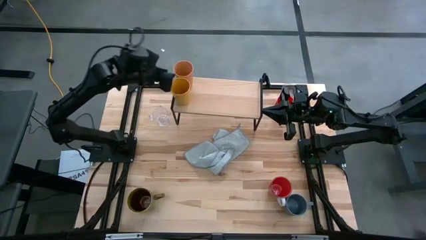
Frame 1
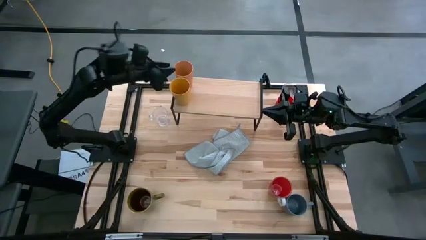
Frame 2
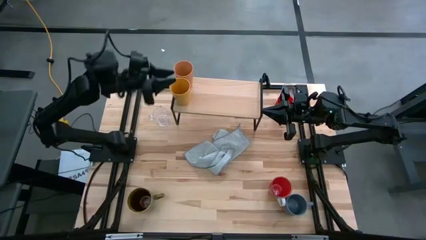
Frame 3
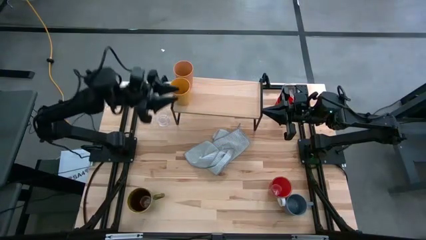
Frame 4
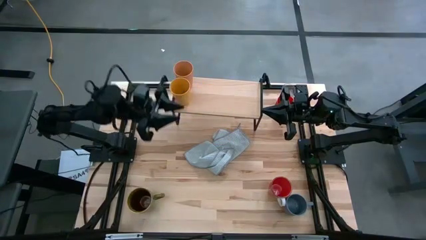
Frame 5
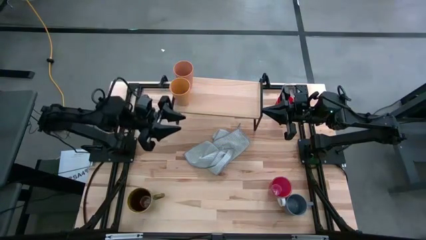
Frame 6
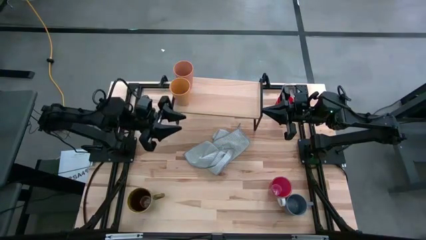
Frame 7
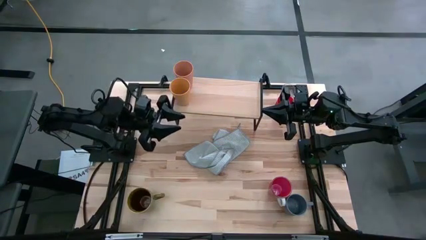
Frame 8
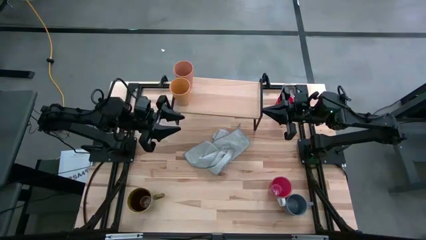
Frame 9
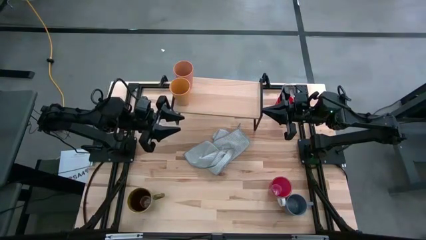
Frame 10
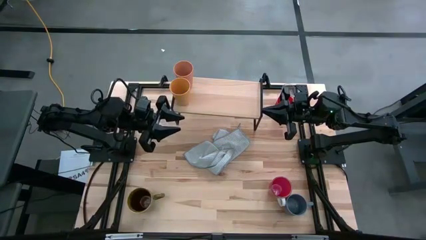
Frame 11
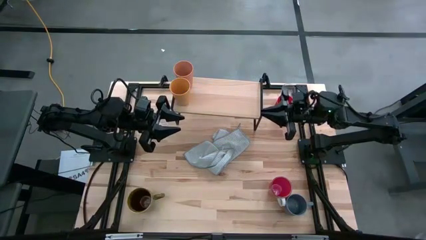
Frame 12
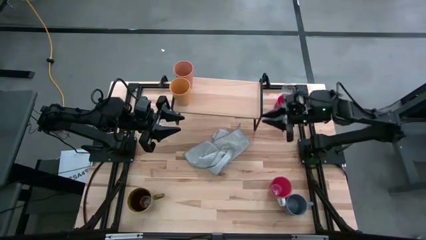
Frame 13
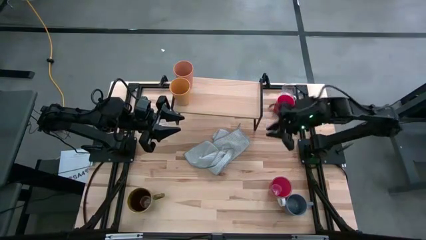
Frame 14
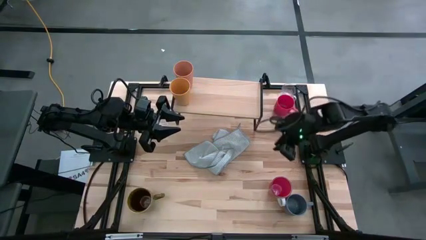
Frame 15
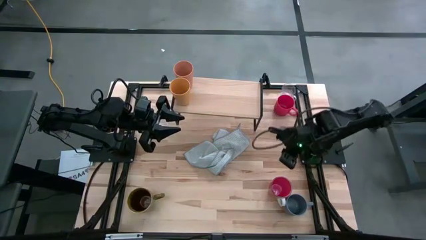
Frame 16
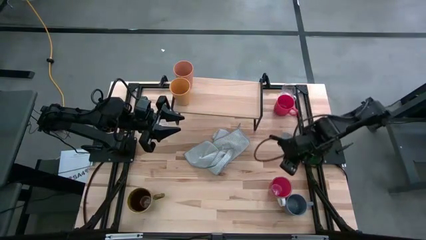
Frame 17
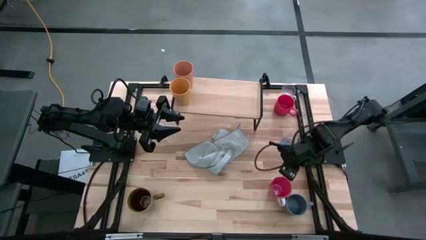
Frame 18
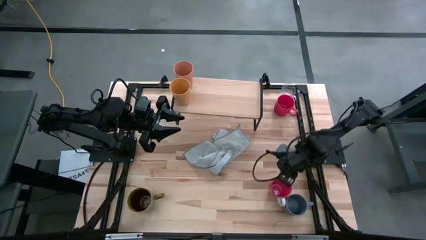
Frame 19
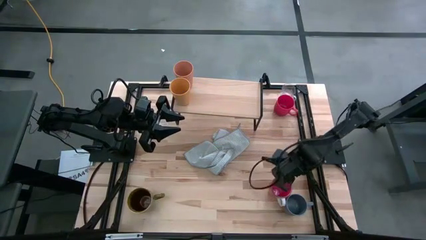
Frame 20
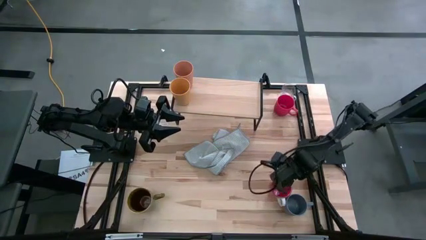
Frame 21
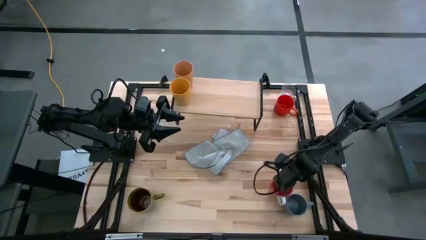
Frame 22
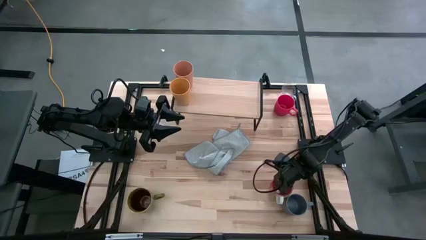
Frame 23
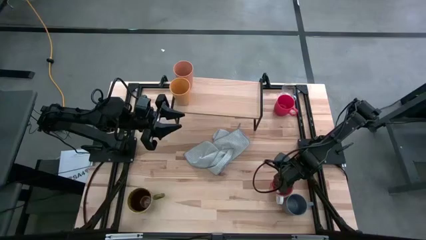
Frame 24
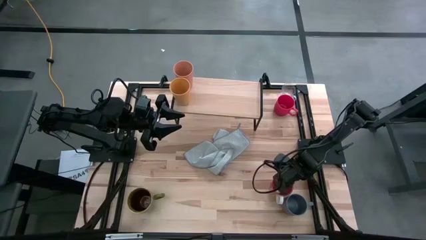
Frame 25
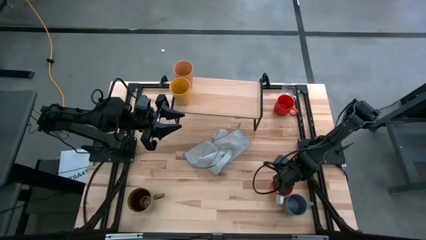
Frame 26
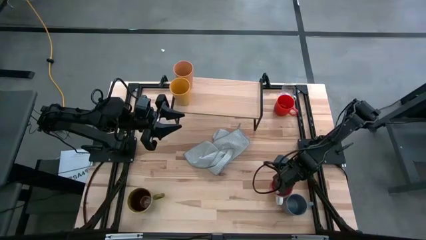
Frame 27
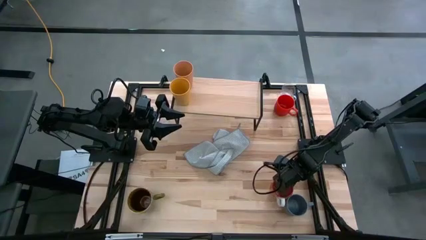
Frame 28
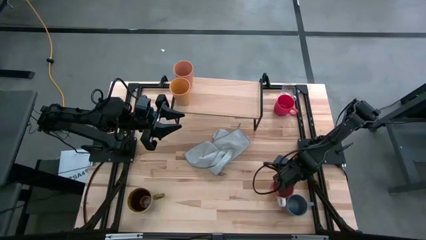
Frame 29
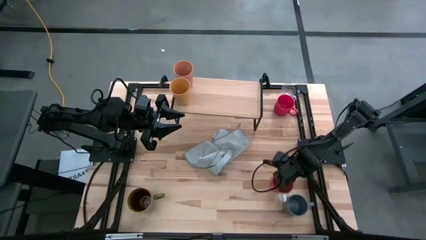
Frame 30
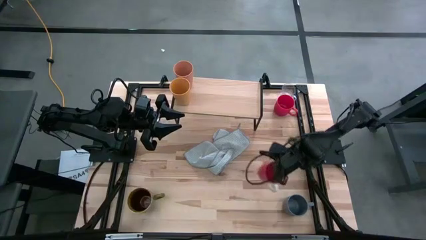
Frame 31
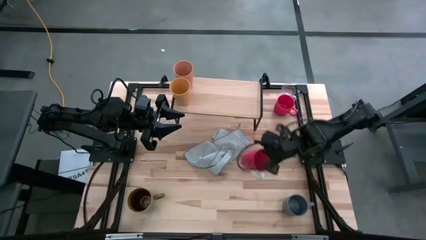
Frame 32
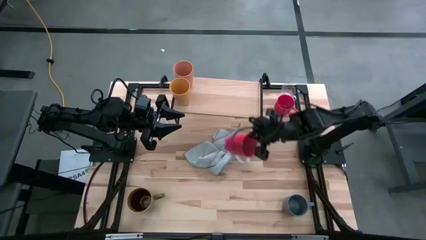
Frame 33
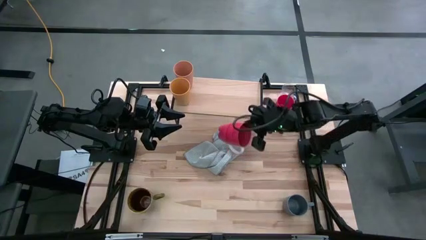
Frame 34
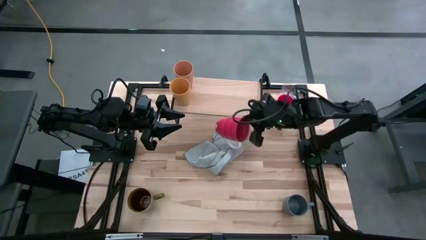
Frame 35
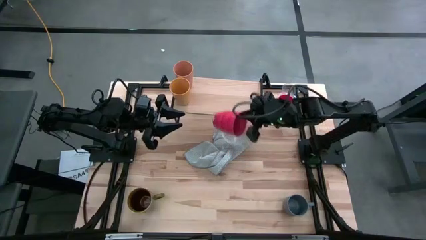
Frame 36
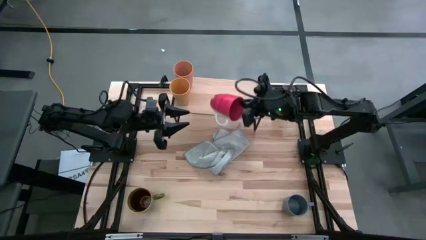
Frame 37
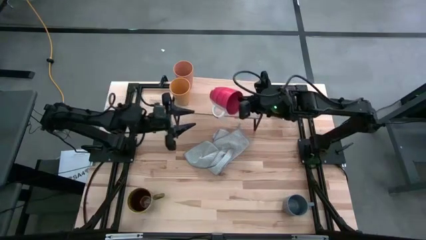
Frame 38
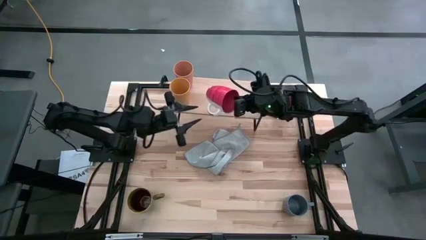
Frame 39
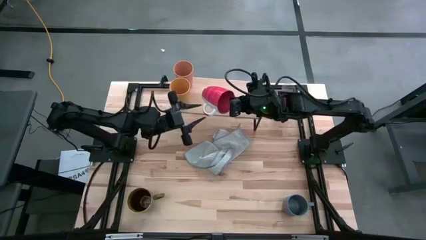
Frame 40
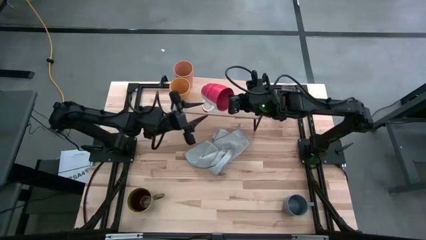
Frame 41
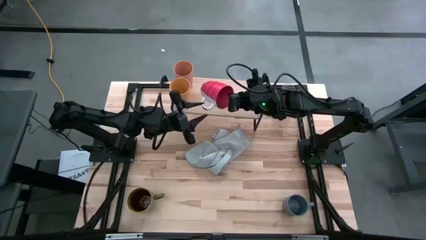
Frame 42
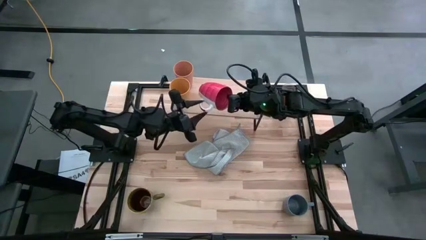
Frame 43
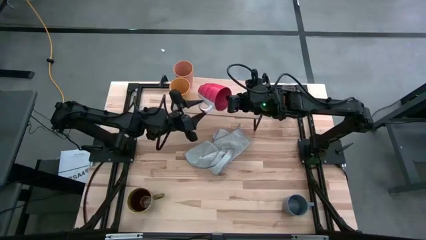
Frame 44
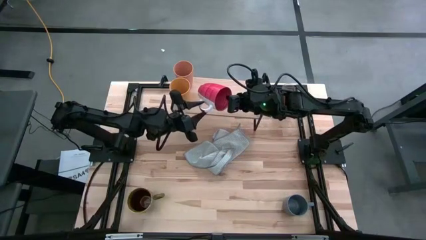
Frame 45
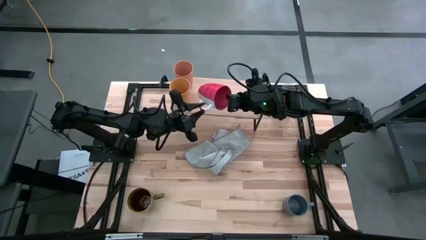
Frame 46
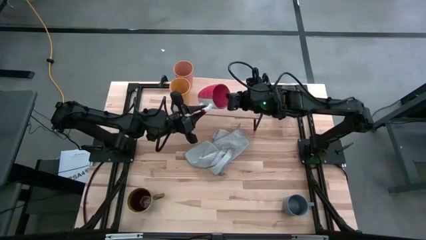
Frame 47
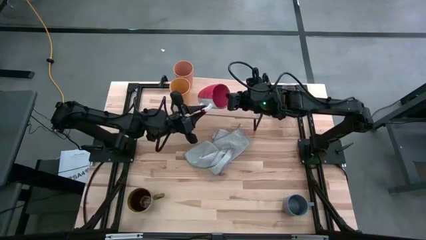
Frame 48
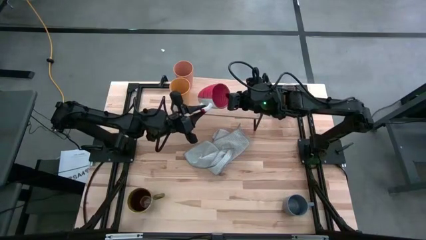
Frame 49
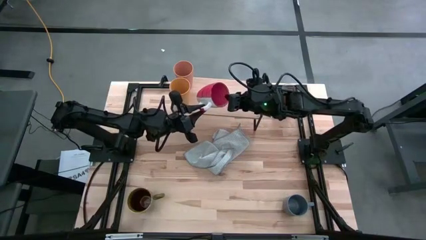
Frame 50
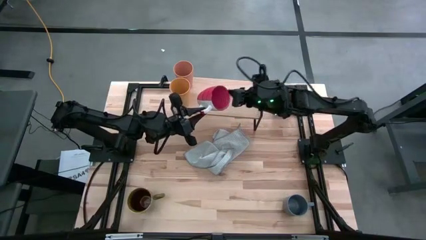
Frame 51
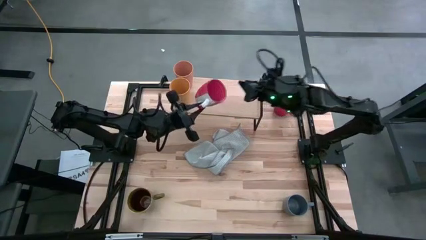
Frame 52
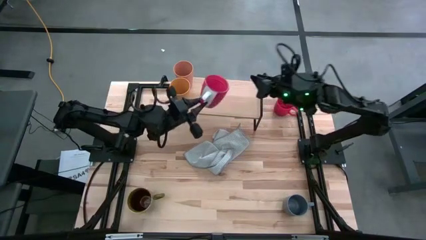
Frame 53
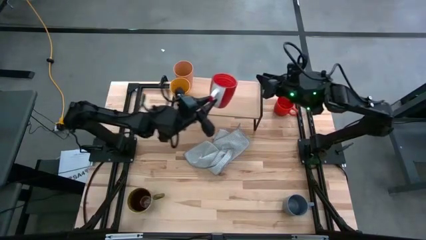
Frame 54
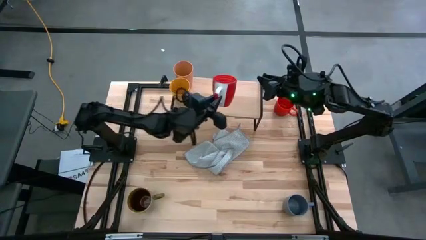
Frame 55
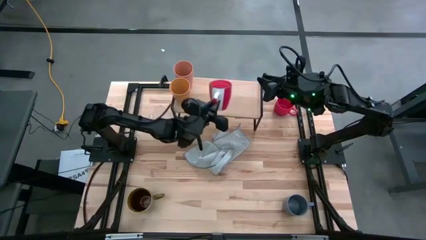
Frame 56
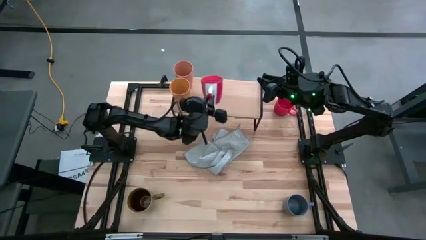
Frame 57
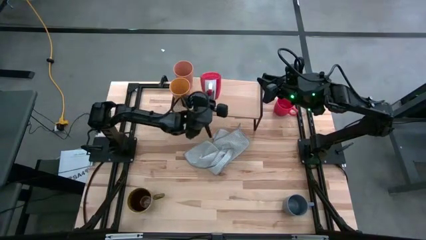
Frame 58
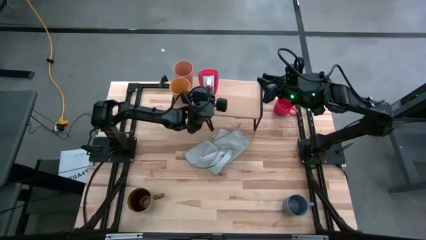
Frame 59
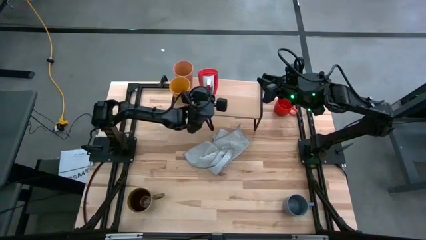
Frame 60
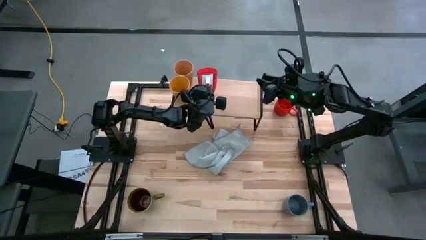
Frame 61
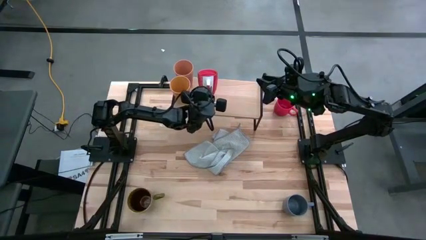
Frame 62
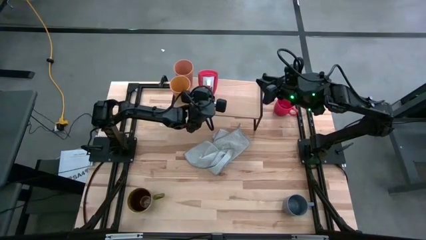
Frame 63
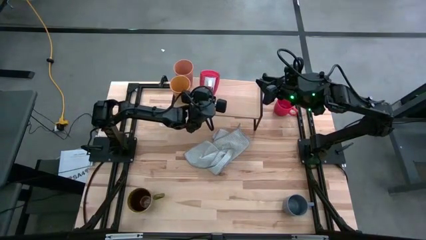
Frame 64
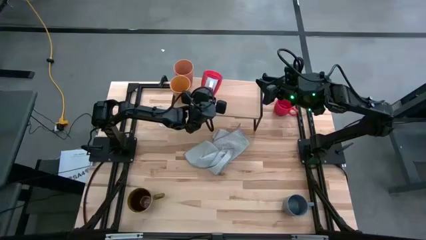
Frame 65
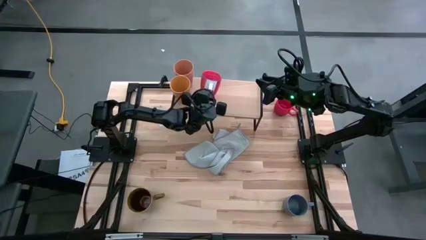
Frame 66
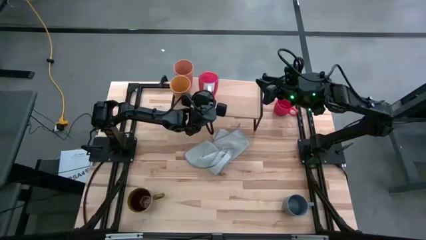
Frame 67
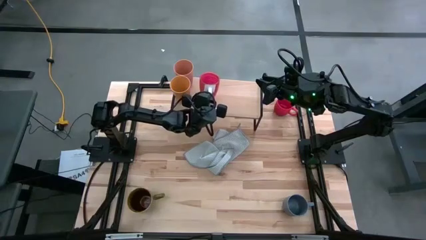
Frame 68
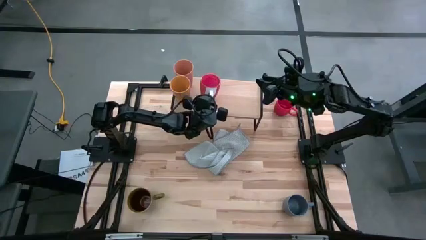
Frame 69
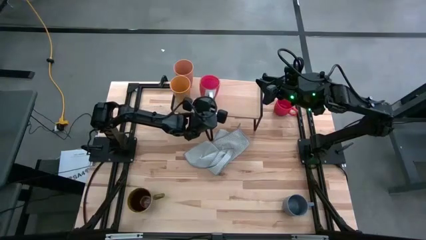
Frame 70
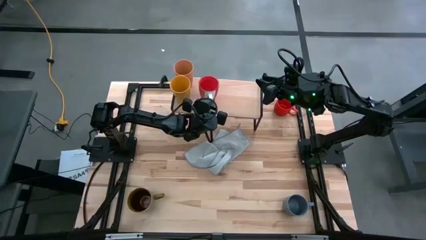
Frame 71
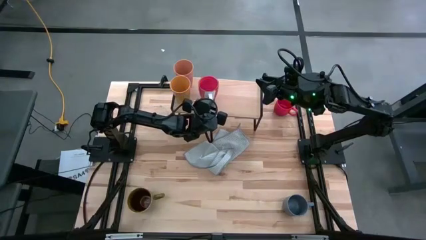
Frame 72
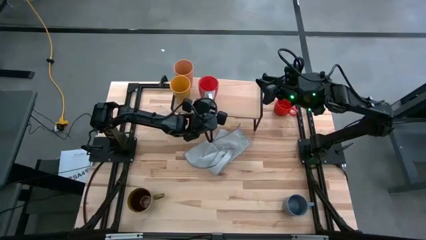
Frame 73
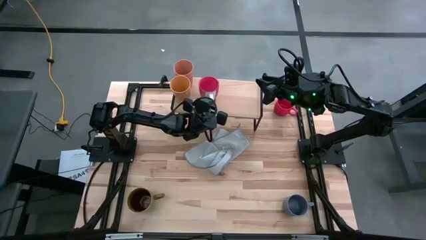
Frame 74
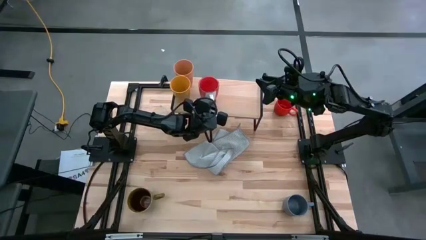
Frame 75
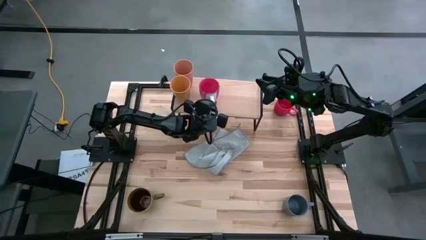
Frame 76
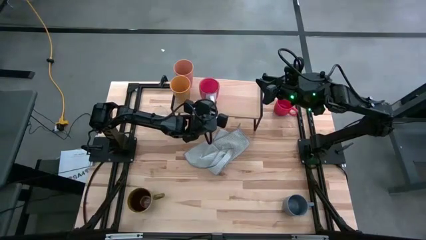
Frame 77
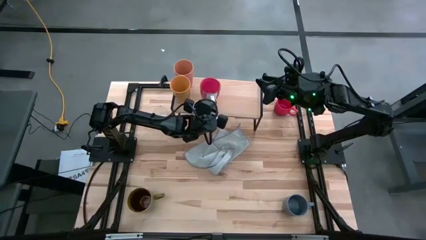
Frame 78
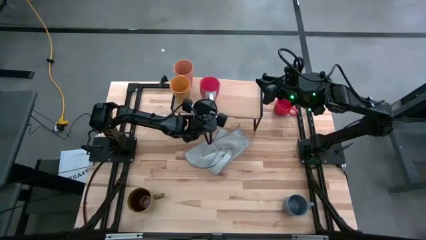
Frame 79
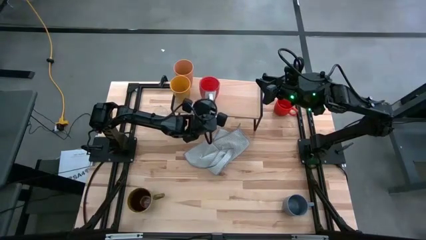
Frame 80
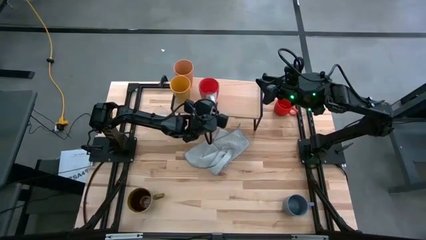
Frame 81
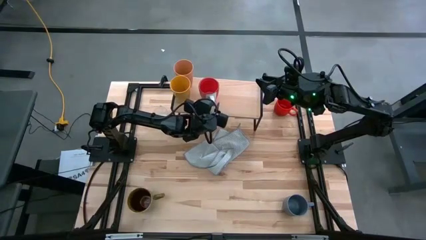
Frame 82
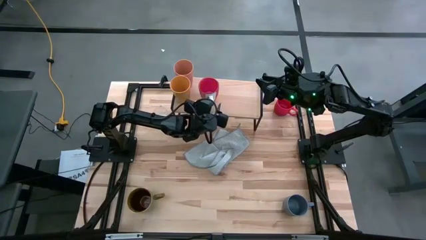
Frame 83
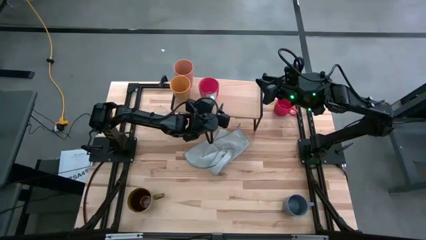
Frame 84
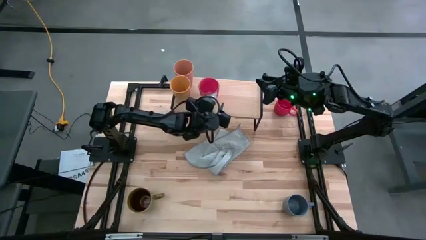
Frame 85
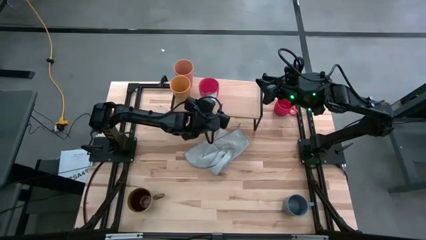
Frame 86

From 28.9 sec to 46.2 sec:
Task: Stack small to large cups/mugs on shelf
Put the red mug on the shelf
